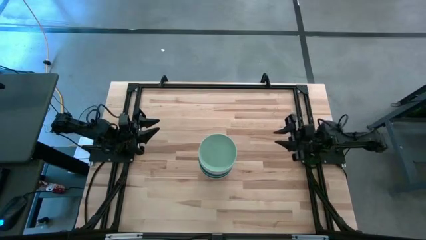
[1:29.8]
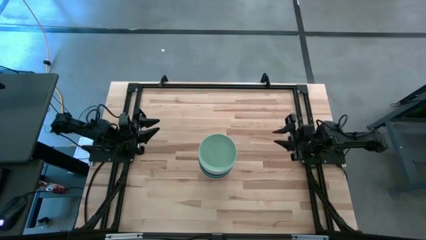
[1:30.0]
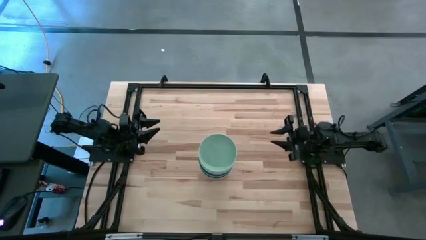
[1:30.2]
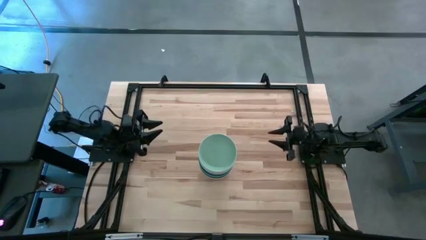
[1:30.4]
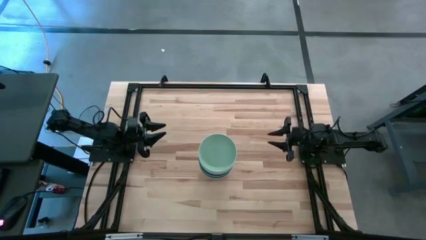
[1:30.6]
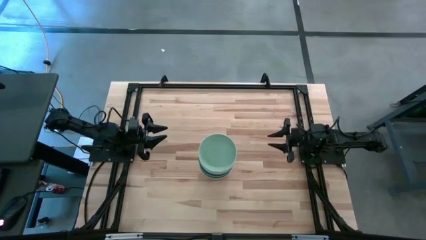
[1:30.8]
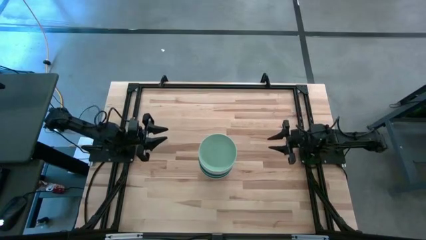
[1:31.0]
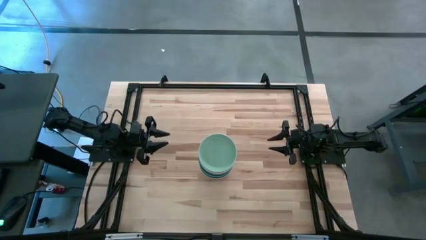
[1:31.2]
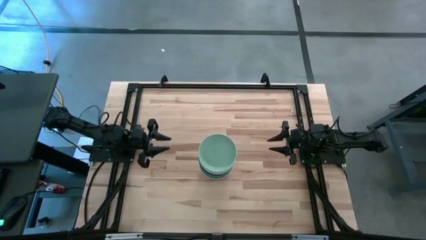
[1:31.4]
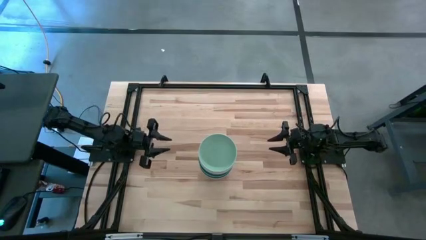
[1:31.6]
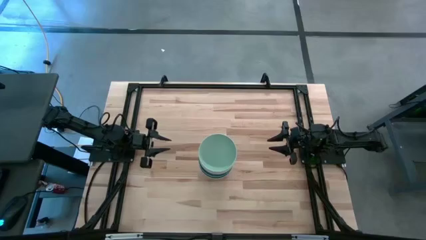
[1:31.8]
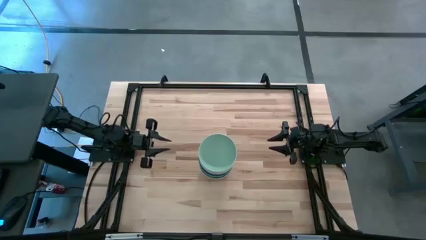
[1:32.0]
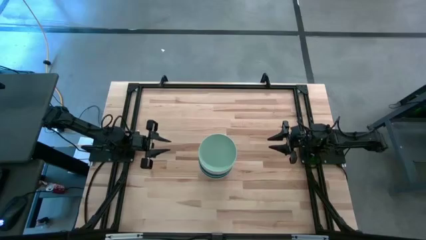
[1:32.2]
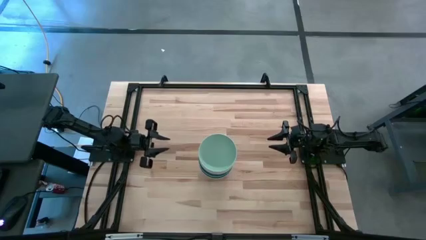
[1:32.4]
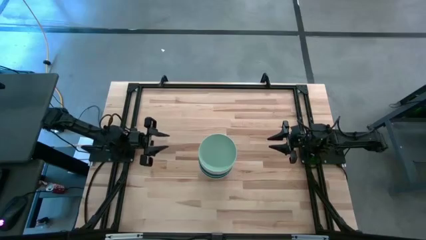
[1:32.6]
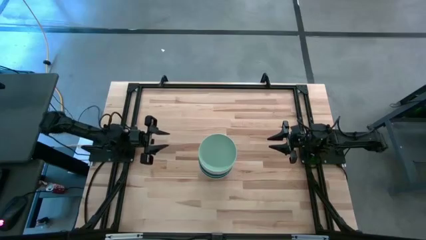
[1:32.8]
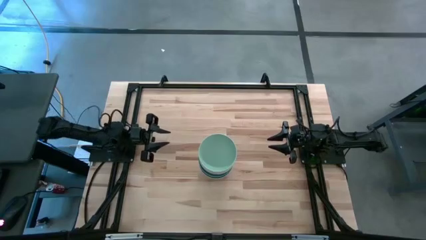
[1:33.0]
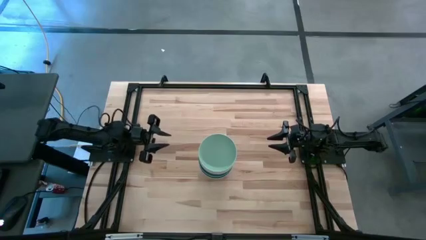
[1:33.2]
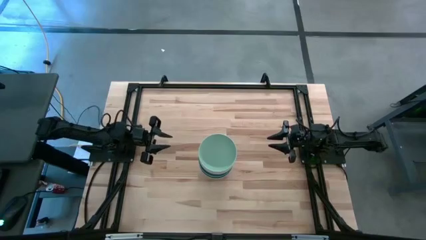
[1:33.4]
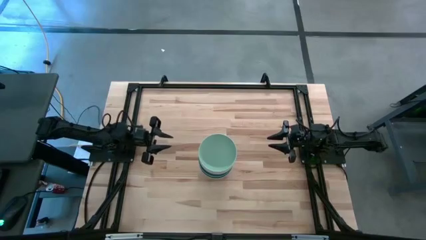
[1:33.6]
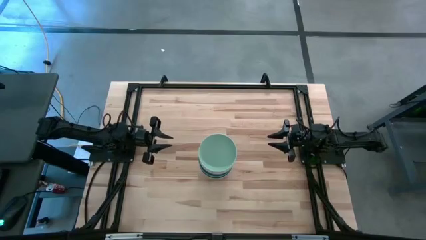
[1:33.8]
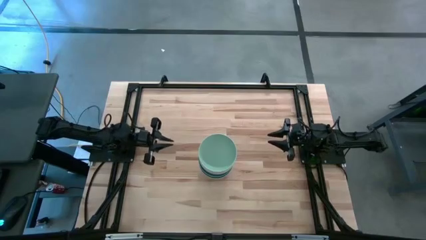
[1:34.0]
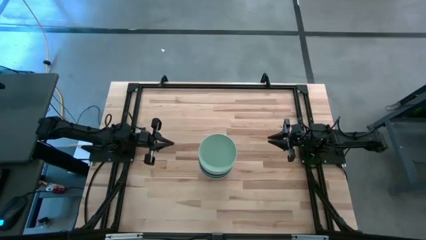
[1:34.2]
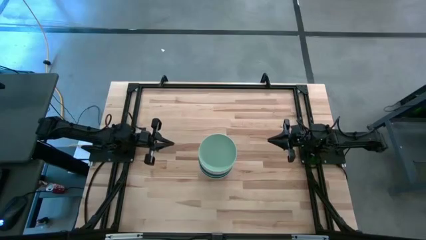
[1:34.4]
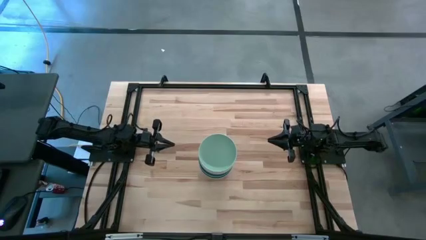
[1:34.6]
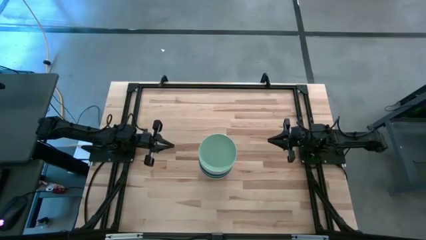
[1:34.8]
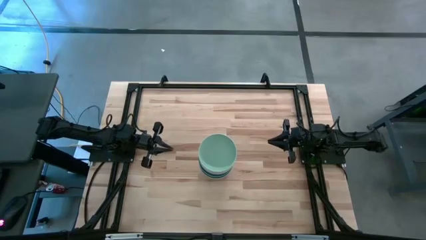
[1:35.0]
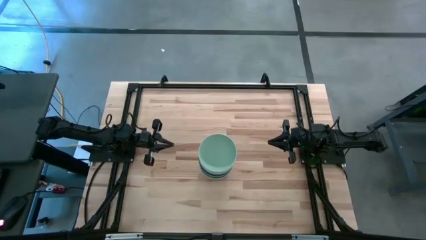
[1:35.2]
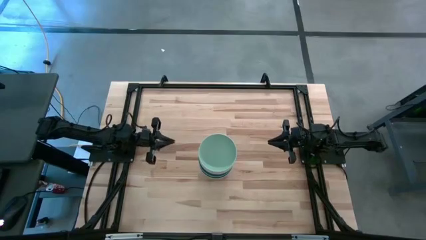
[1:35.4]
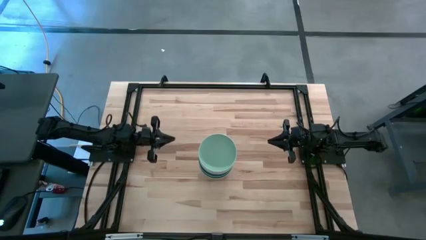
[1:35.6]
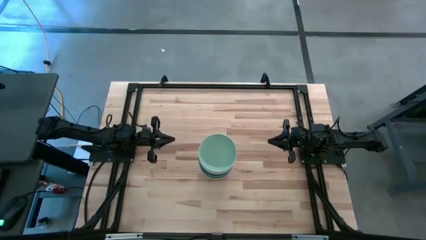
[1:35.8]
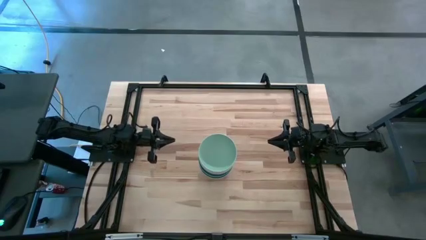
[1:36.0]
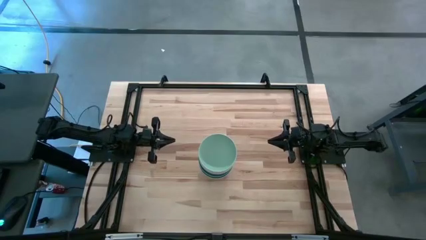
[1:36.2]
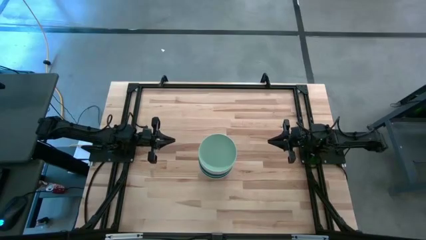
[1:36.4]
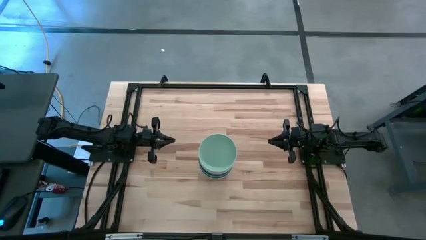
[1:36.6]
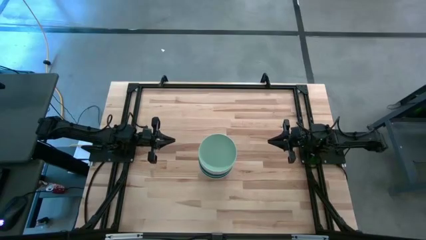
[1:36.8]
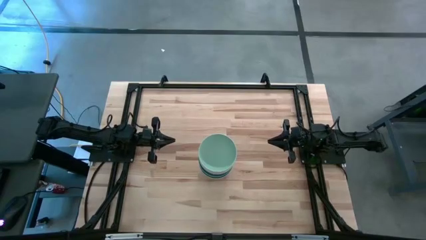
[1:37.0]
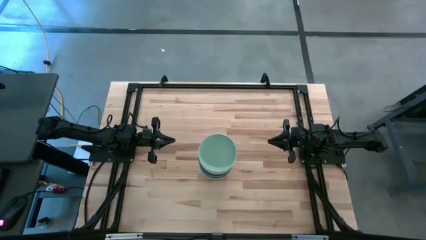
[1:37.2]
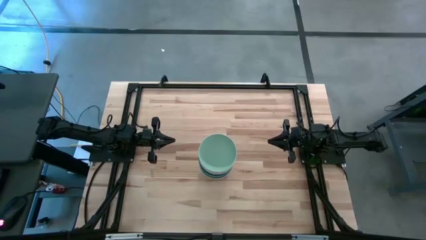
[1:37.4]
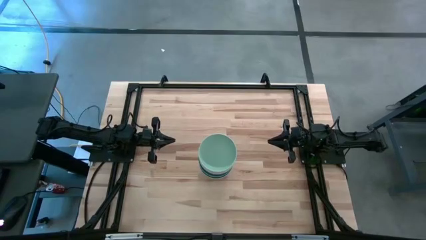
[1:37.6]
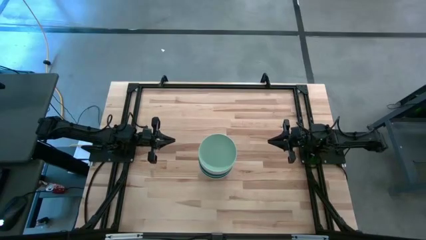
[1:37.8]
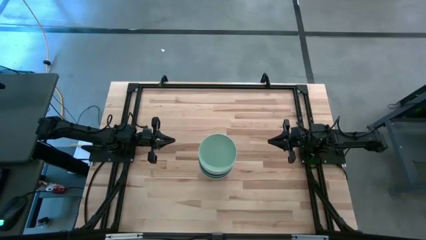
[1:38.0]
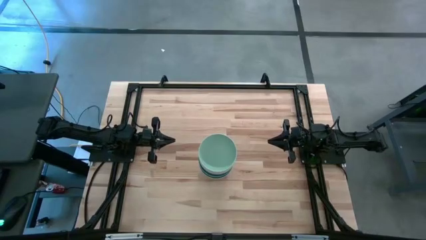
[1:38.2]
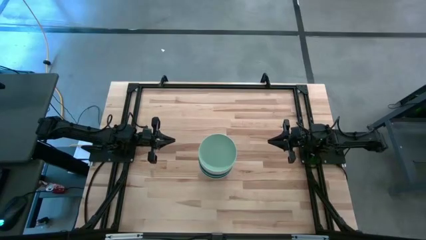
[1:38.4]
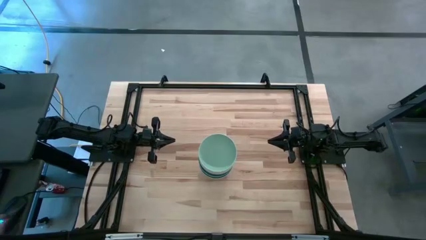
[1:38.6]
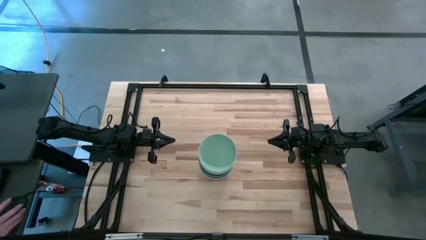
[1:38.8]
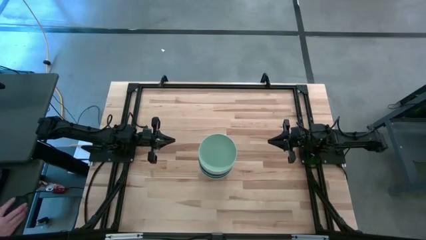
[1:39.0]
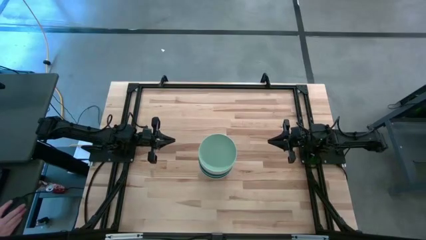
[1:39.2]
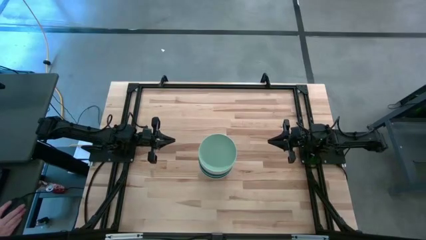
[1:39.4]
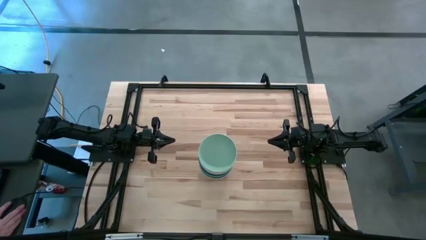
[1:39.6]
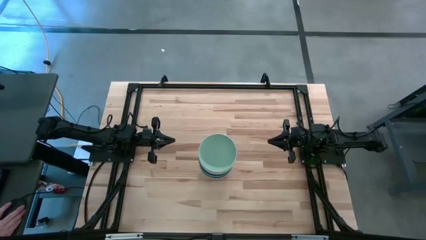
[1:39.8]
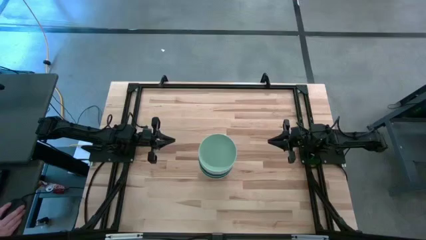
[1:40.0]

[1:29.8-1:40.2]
Task: Nest bowls inside each other
Return to home position
